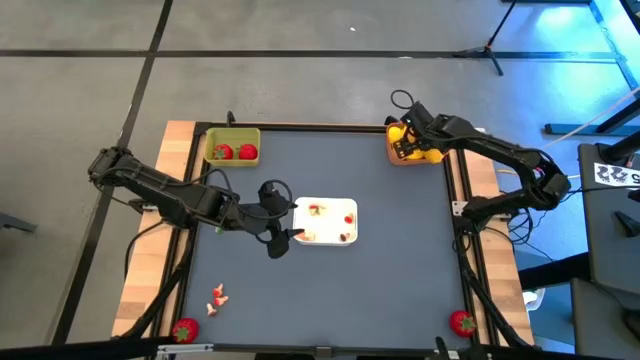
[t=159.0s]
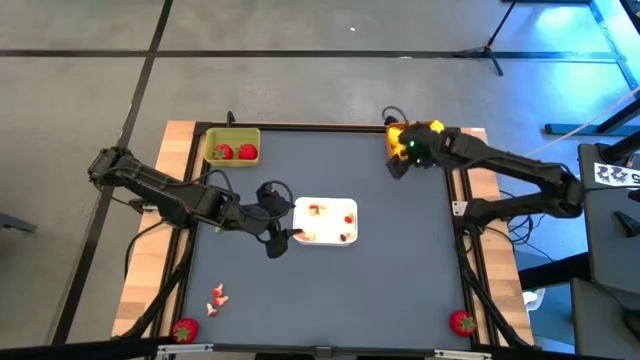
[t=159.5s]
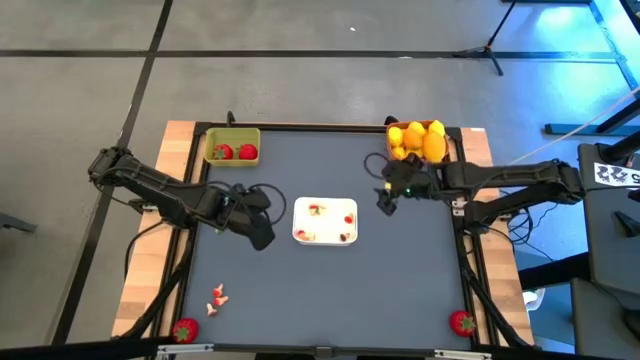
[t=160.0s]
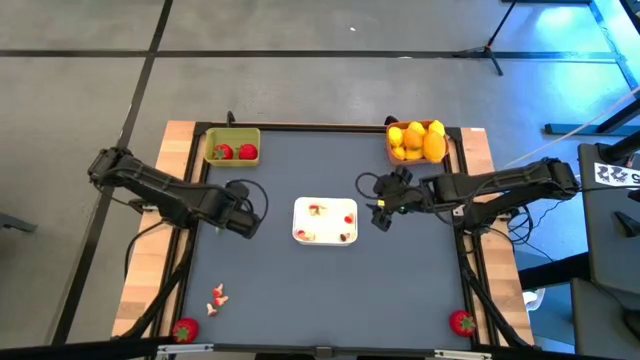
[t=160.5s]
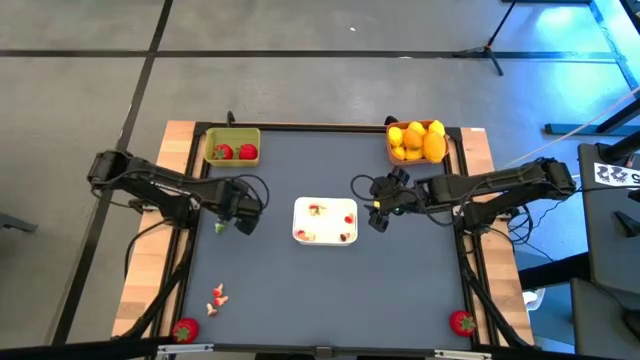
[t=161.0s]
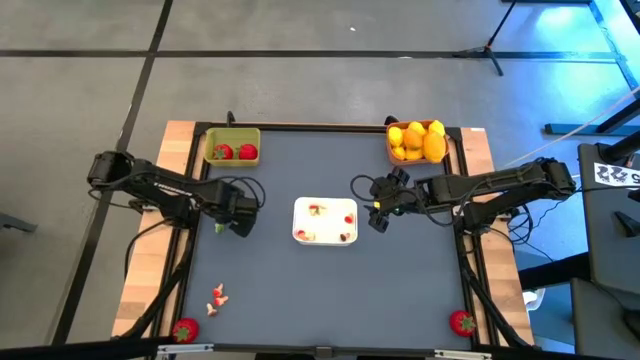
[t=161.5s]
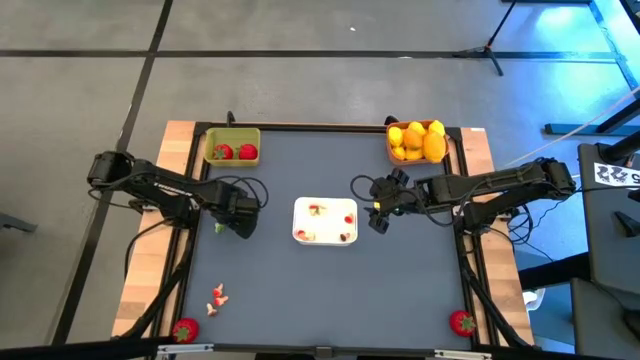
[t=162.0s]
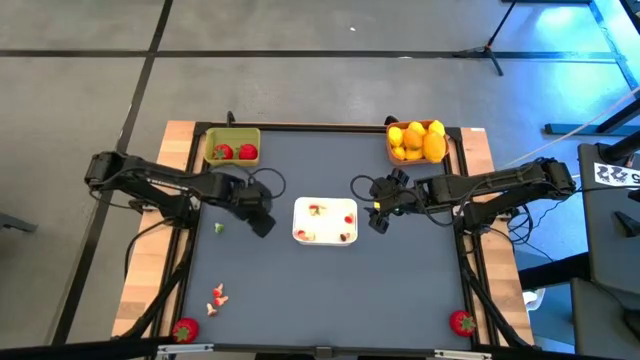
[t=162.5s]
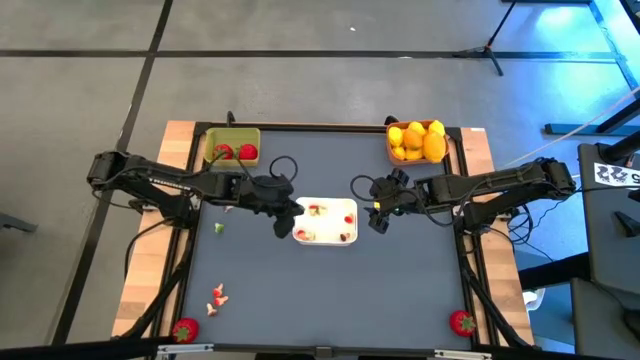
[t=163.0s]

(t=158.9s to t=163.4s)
Task: Sort produce into baskets
Put the brown mushroom into the white bin

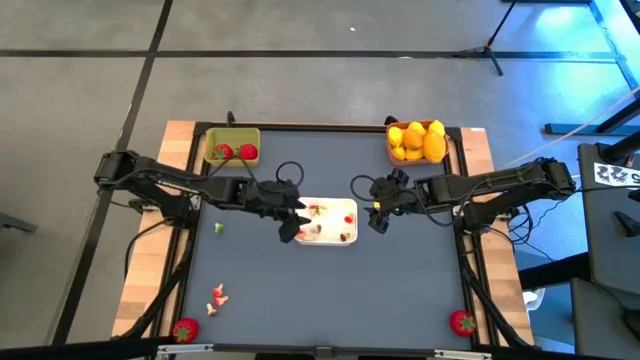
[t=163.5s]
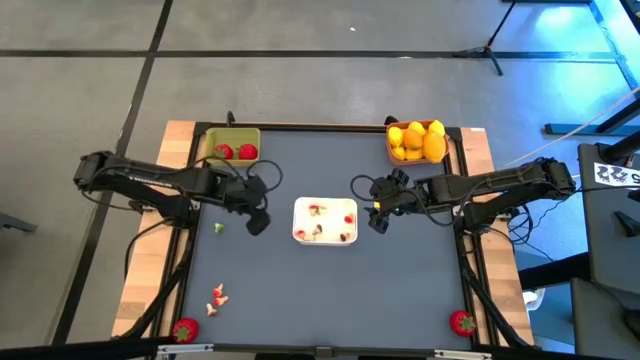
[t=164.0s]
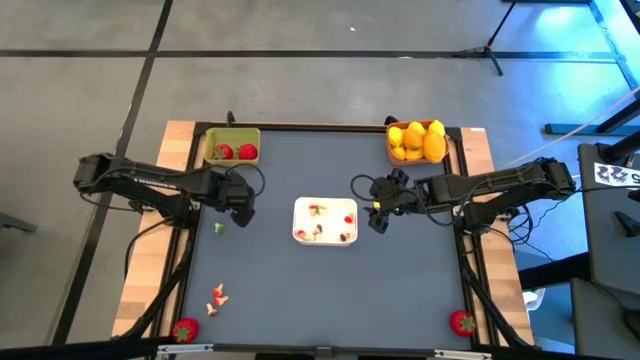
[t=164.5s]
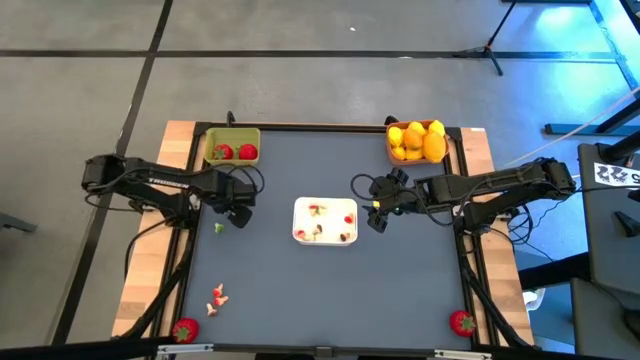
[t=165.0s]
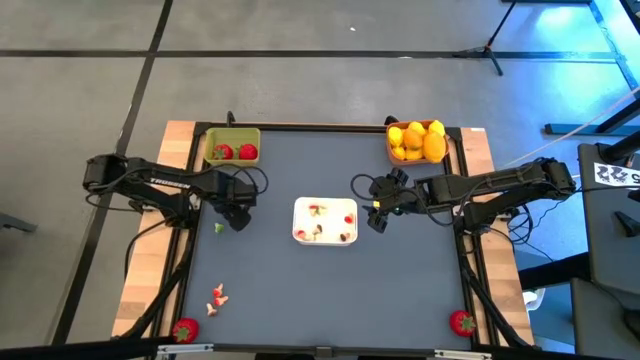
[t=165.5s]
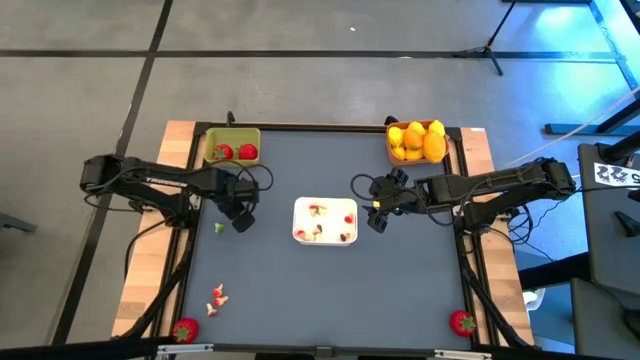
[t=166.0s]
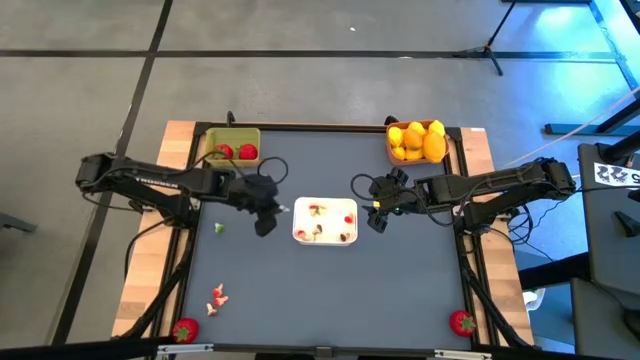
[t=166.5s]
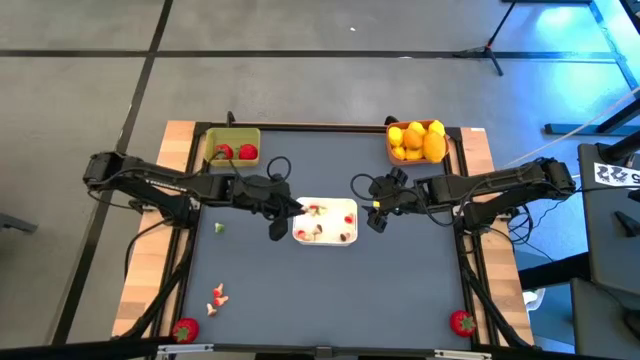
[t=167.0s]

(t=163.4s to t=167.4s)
Put the brown mushroom into the white bin

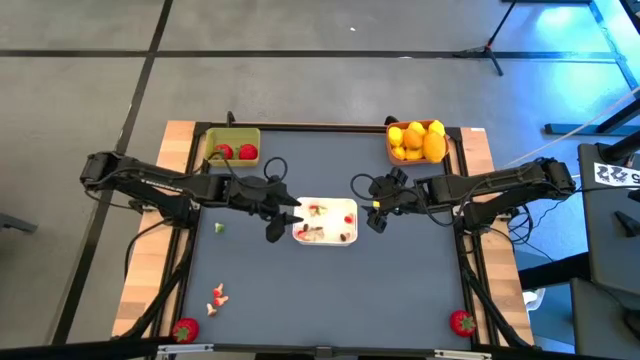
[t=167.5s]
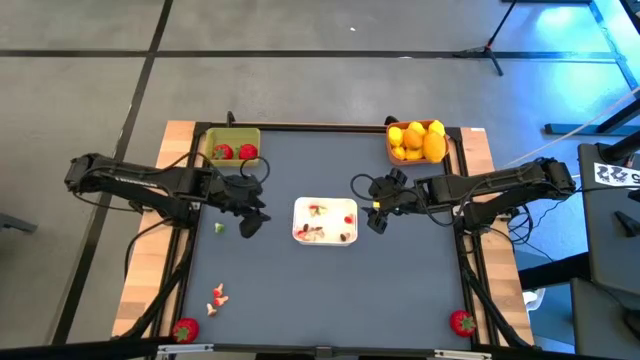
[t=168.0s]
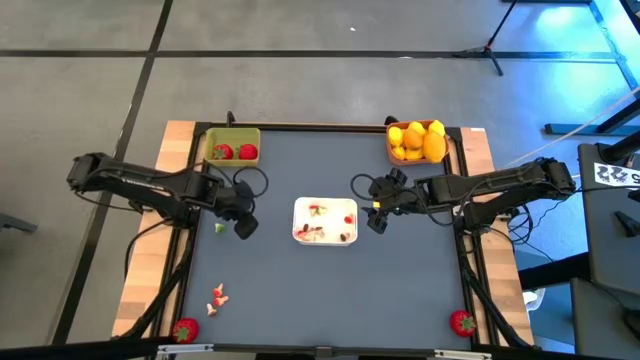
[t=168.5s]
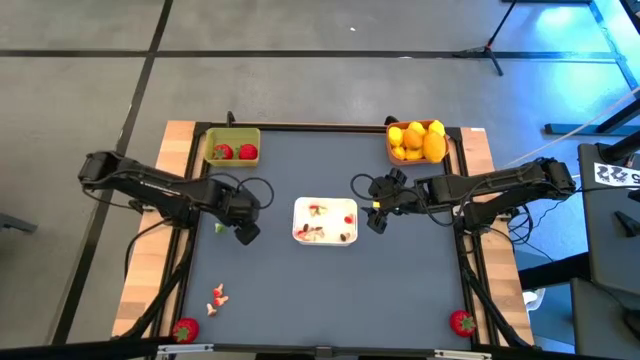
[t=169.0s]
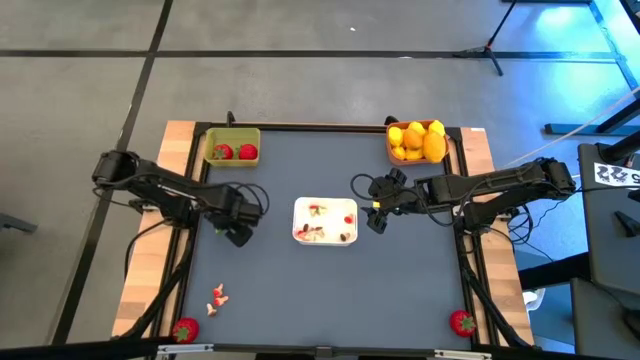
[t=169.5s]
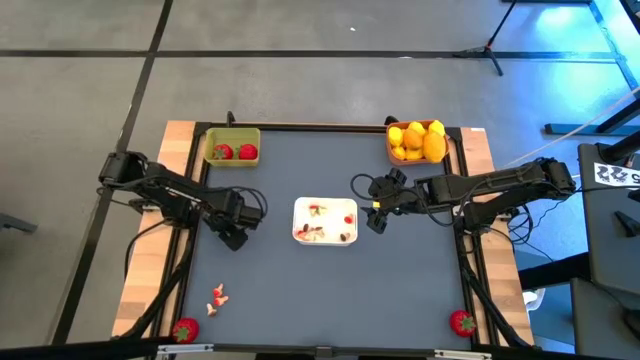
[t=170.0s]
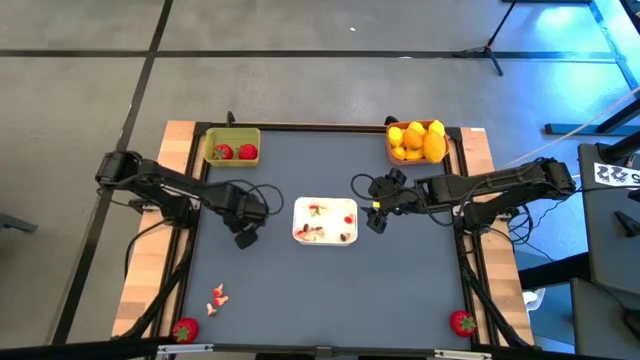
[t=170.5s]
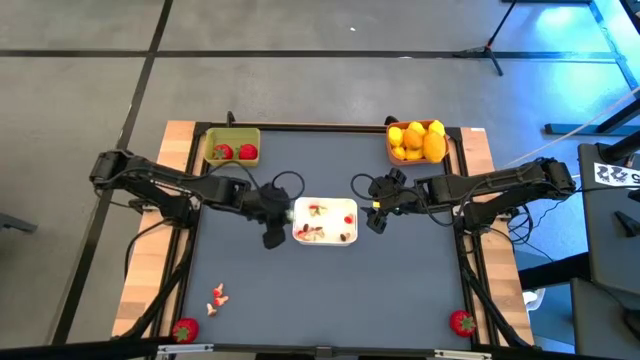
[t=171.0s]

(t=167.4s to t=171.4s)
Put the green mushroom into the white bin

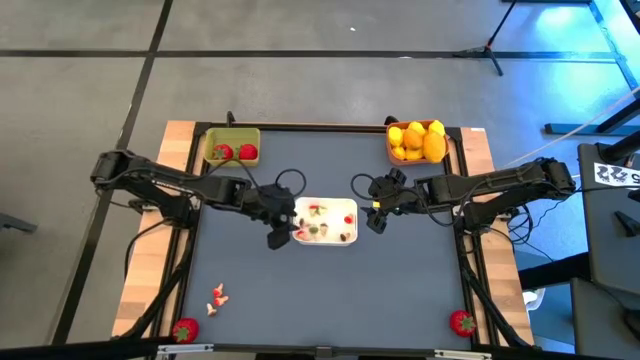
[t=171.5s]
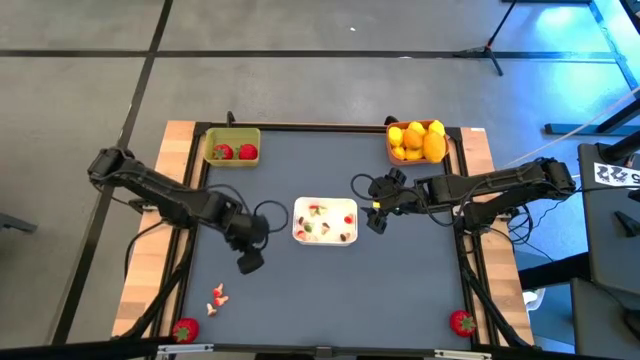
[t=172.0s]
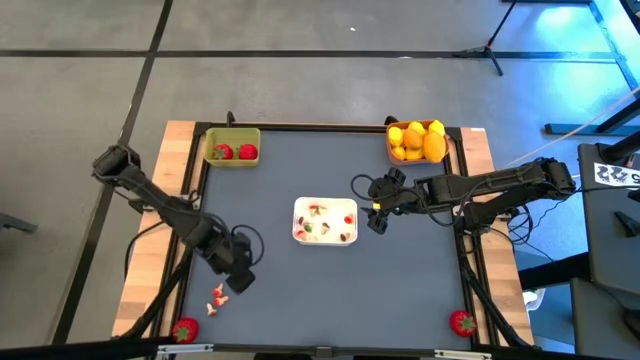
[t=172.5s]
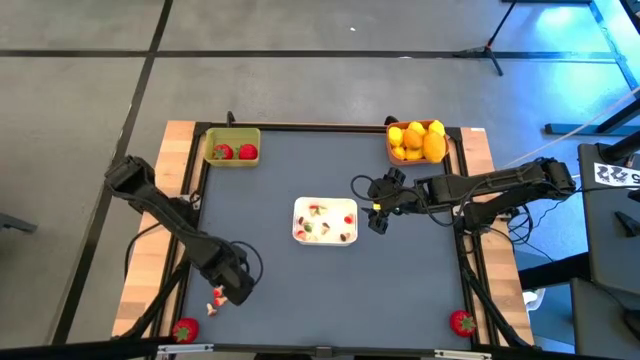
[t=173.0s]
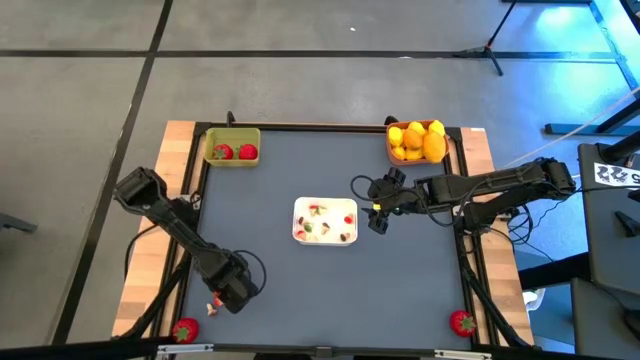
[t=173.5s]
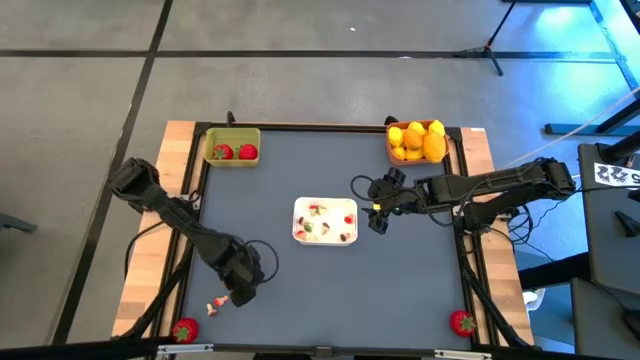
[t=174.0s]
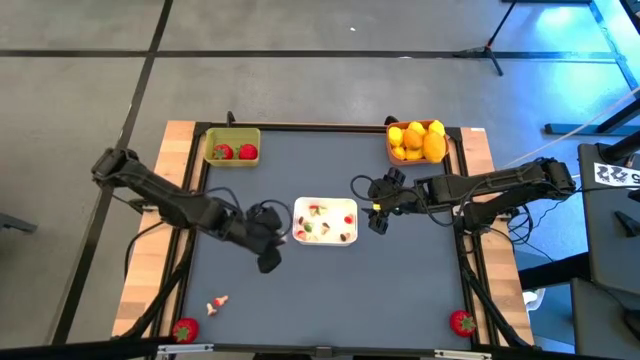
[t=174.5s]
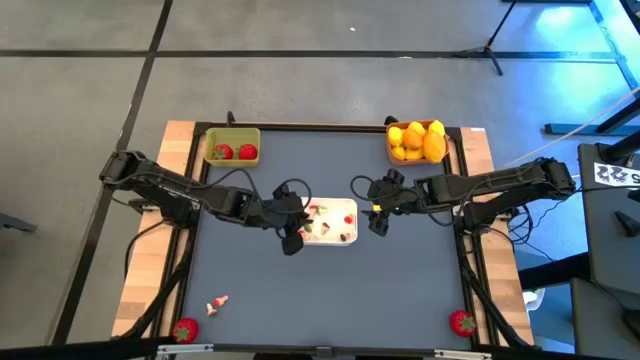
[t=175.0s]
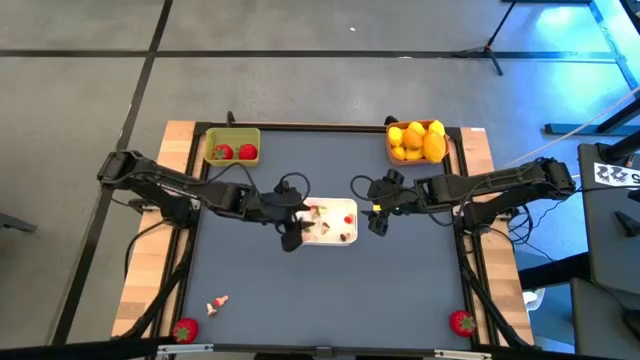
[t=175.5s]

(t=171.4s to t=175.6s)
Put the red mushroom into the white bin

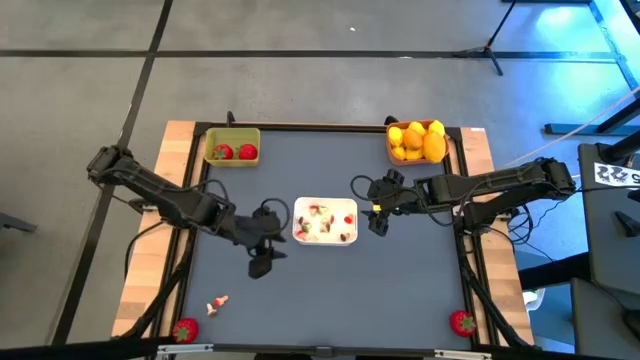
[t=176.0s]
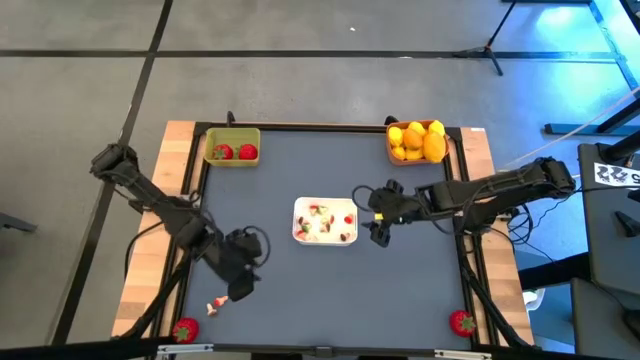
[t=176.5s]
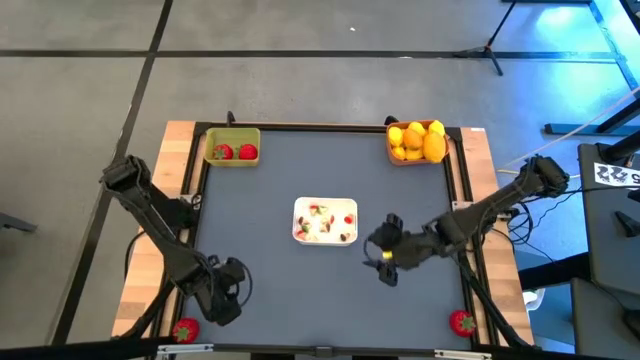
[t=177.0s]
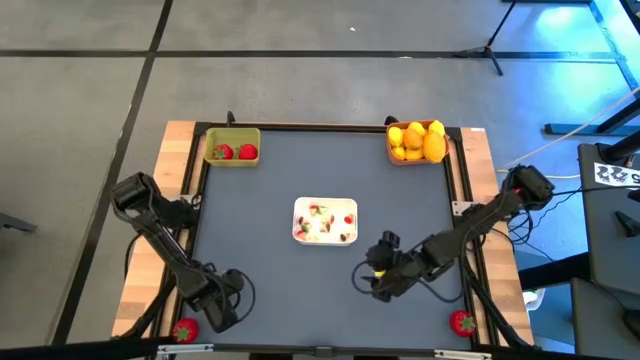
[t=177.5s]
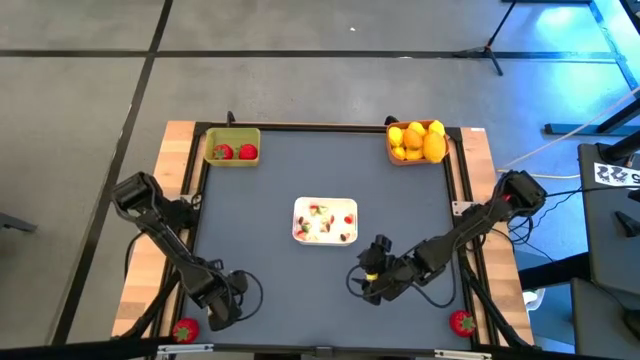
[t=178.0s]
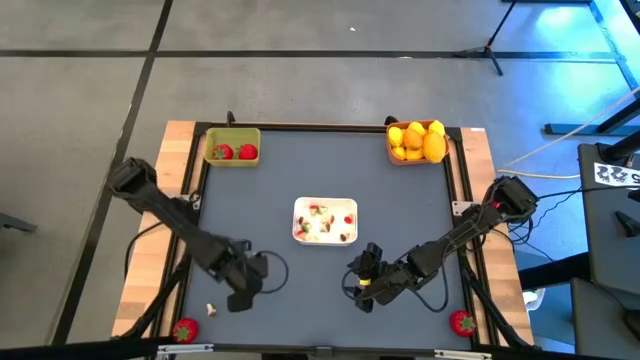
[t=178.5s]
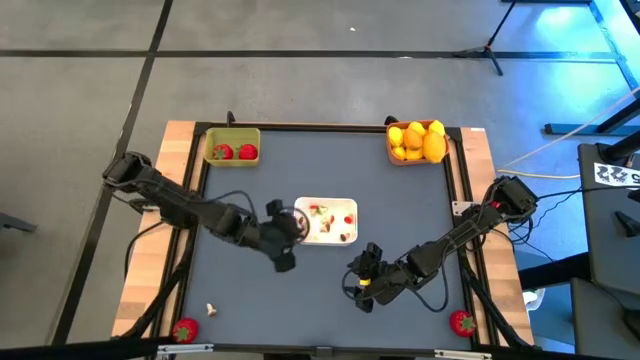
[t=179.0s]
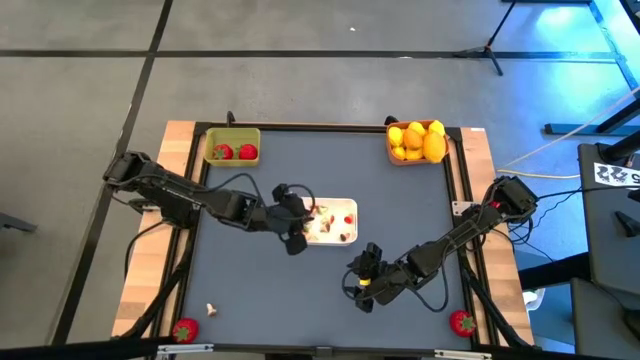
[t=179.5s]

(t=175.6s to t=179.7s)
Put the red mushroom into the white bin
